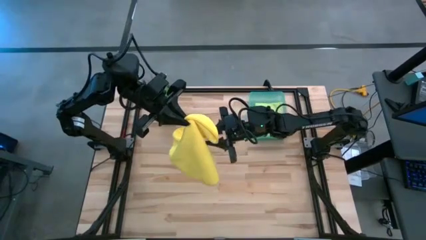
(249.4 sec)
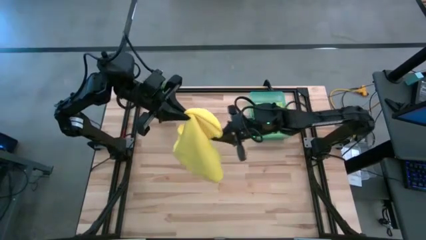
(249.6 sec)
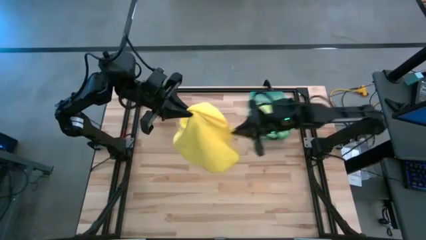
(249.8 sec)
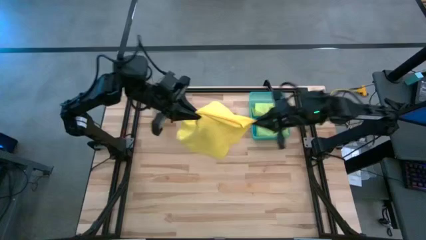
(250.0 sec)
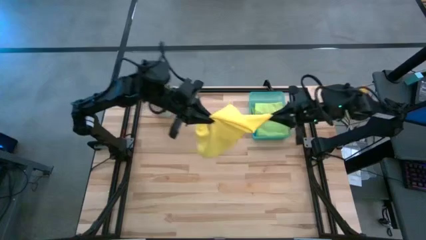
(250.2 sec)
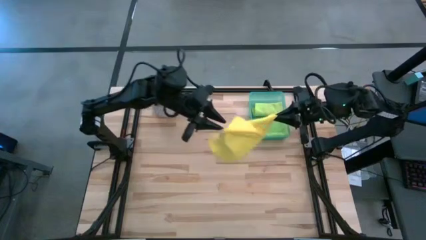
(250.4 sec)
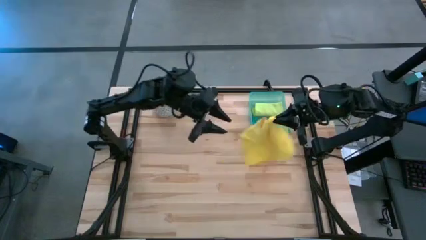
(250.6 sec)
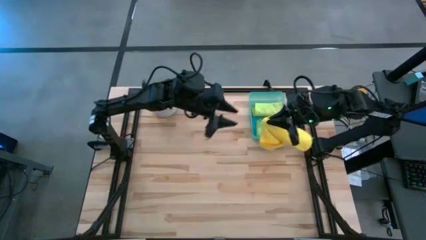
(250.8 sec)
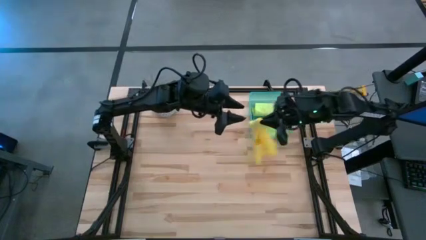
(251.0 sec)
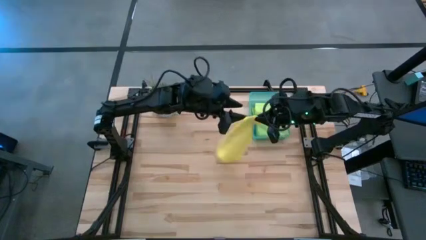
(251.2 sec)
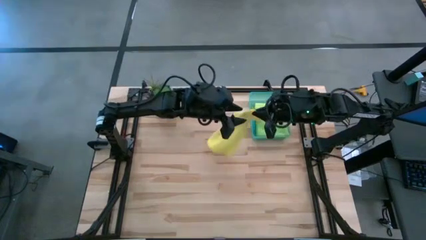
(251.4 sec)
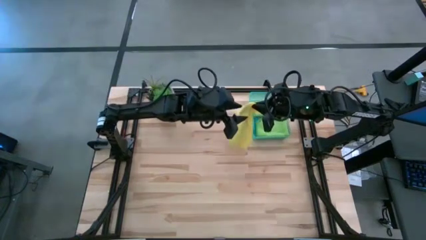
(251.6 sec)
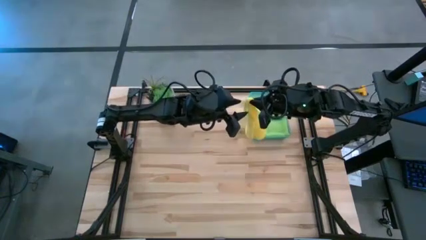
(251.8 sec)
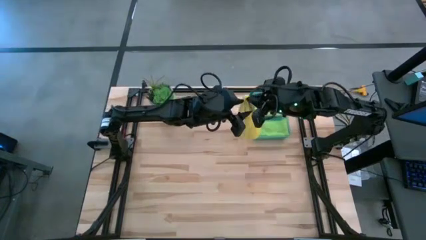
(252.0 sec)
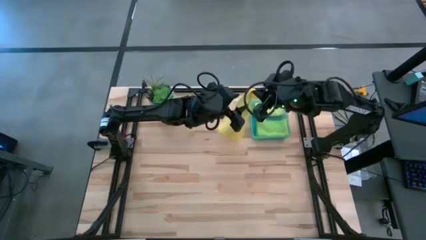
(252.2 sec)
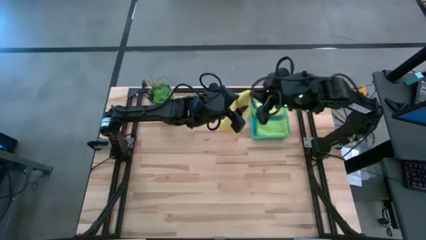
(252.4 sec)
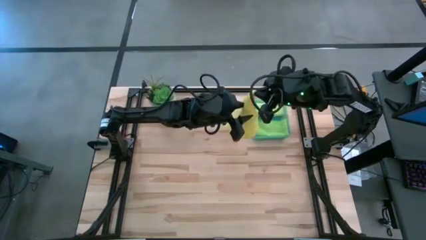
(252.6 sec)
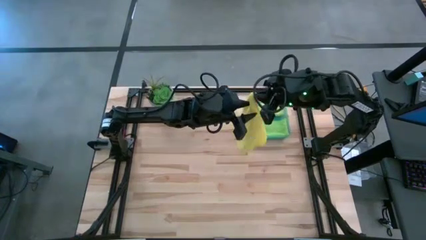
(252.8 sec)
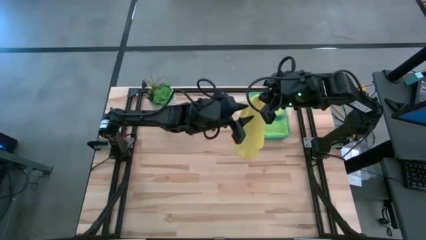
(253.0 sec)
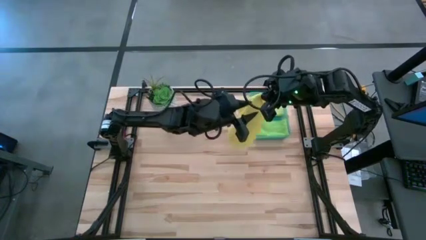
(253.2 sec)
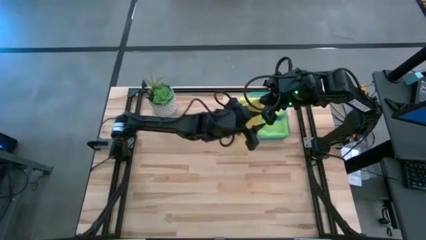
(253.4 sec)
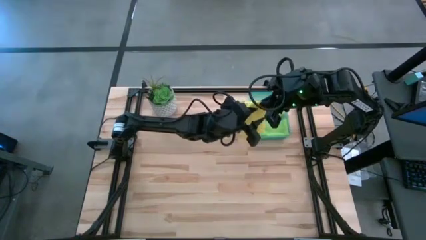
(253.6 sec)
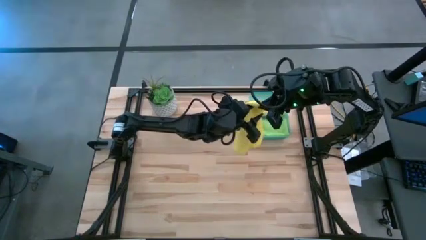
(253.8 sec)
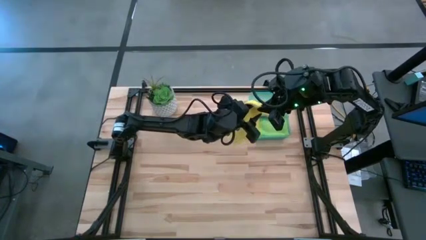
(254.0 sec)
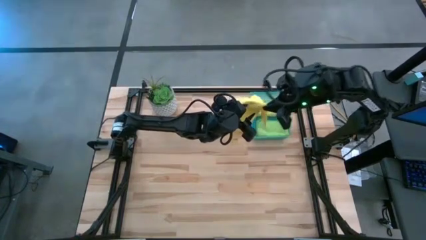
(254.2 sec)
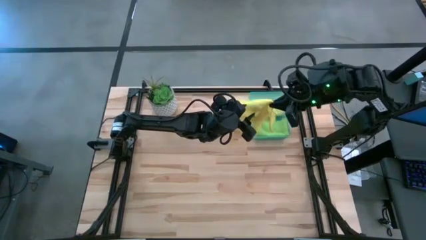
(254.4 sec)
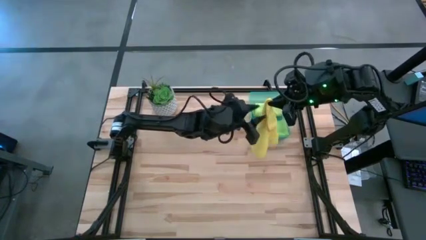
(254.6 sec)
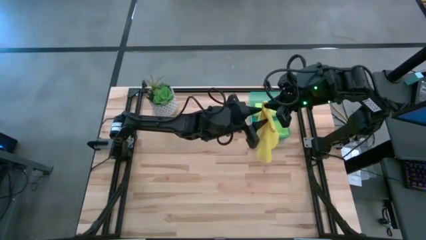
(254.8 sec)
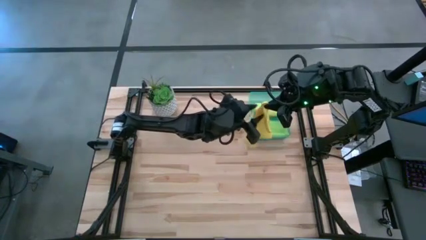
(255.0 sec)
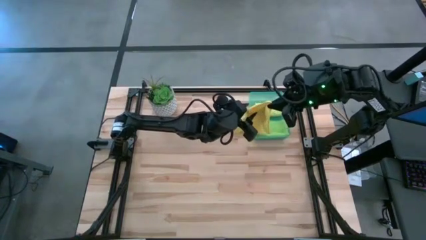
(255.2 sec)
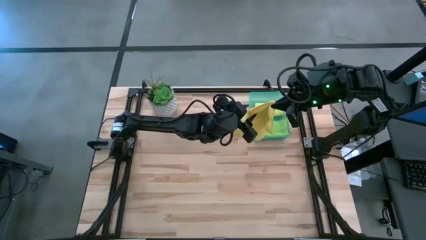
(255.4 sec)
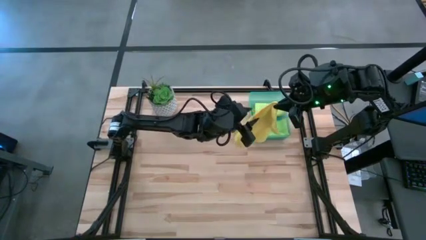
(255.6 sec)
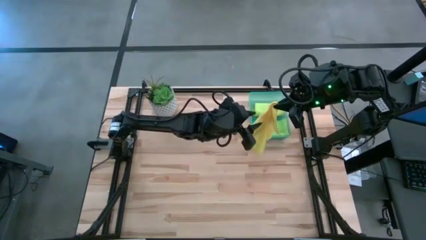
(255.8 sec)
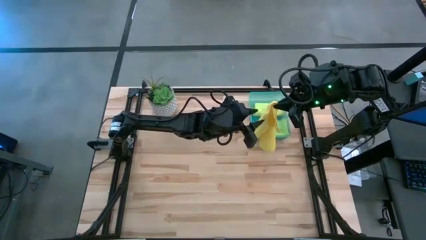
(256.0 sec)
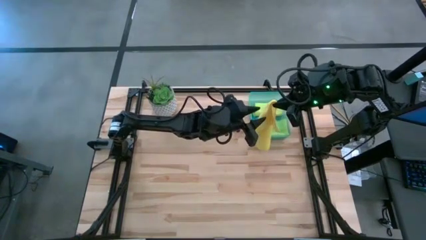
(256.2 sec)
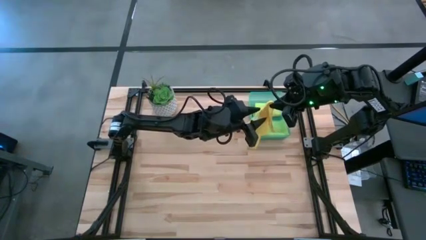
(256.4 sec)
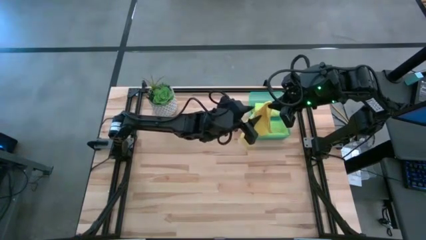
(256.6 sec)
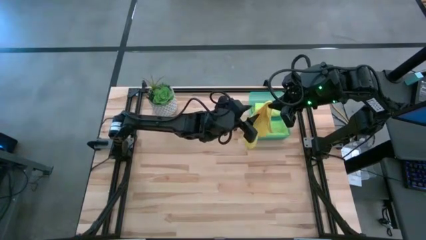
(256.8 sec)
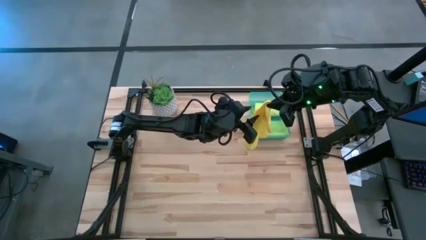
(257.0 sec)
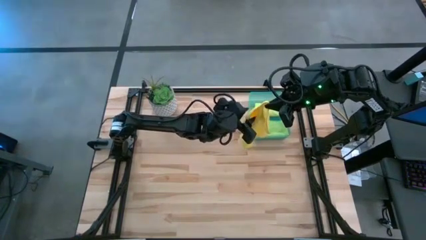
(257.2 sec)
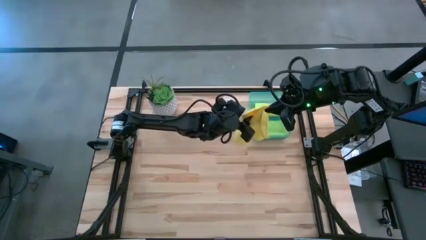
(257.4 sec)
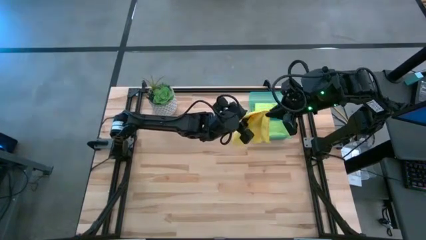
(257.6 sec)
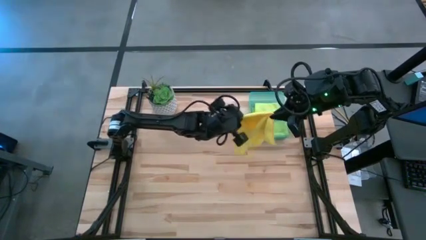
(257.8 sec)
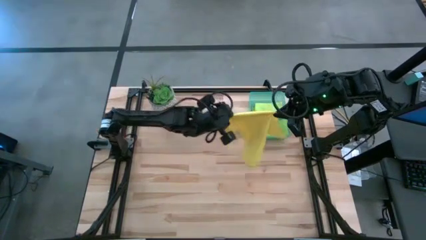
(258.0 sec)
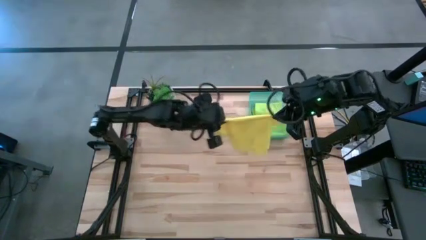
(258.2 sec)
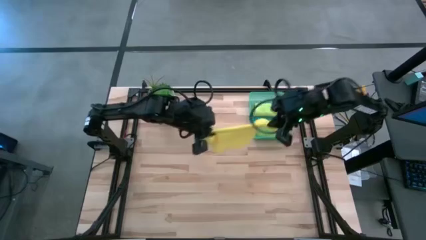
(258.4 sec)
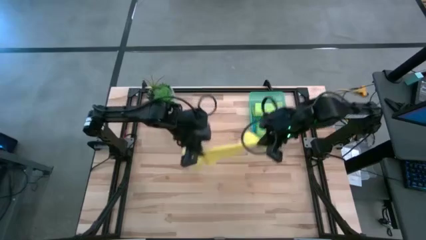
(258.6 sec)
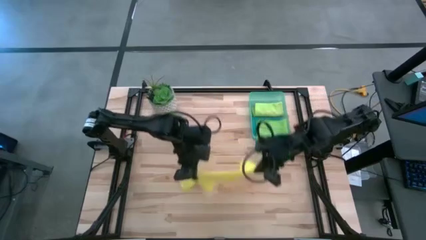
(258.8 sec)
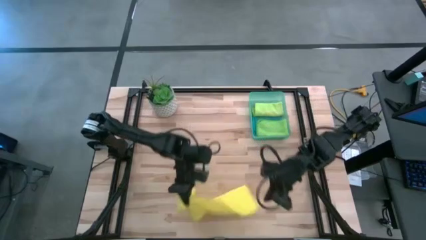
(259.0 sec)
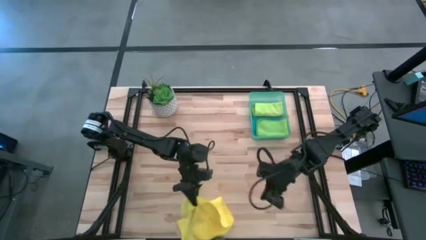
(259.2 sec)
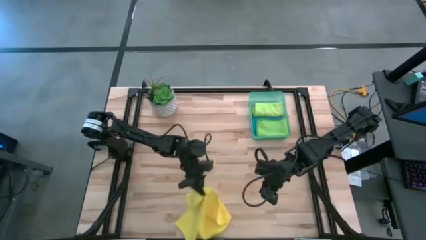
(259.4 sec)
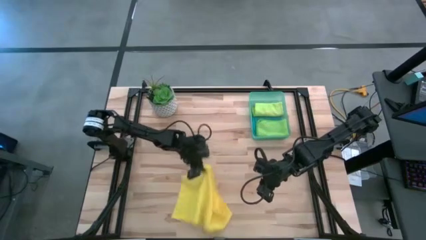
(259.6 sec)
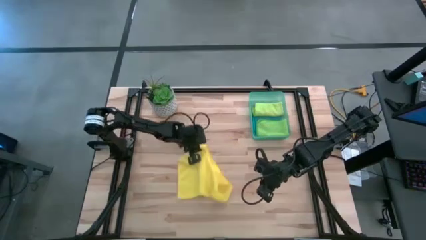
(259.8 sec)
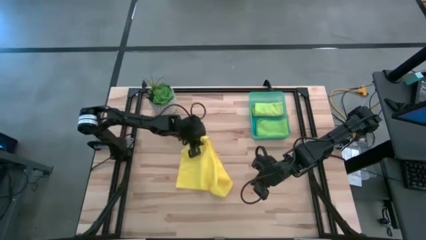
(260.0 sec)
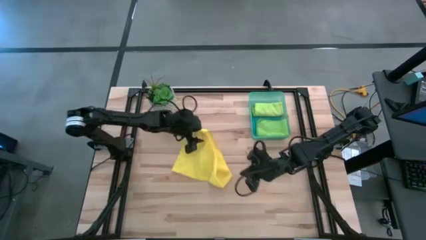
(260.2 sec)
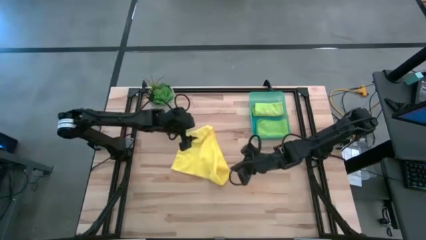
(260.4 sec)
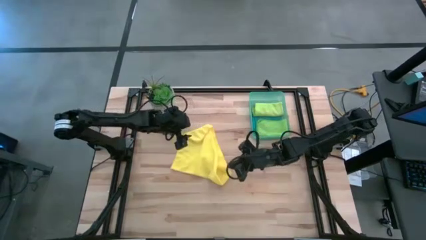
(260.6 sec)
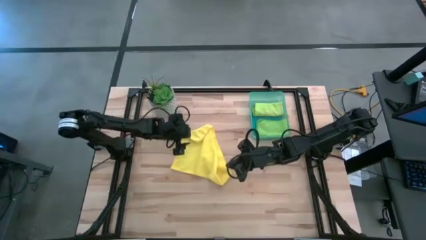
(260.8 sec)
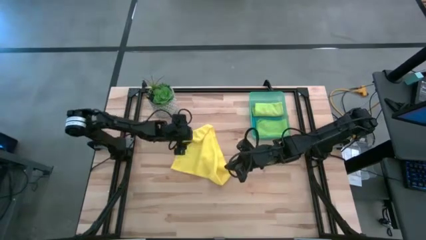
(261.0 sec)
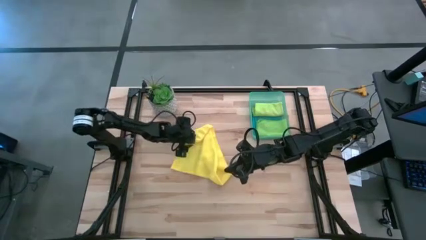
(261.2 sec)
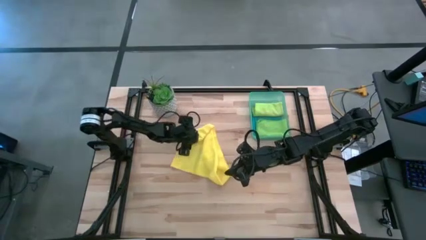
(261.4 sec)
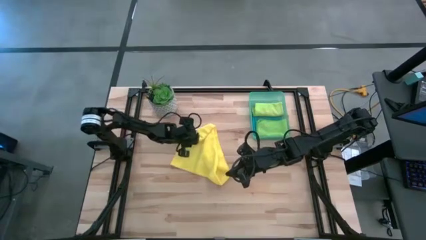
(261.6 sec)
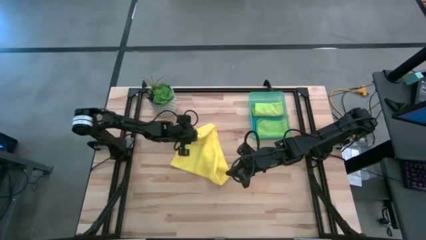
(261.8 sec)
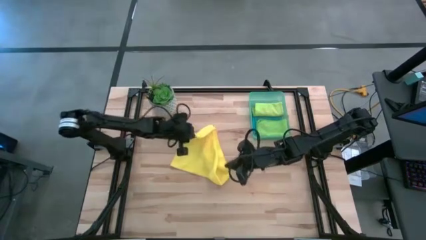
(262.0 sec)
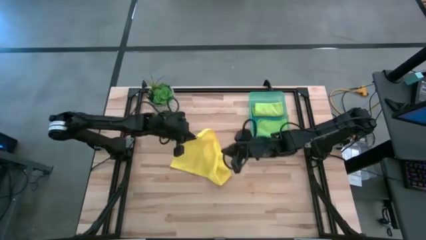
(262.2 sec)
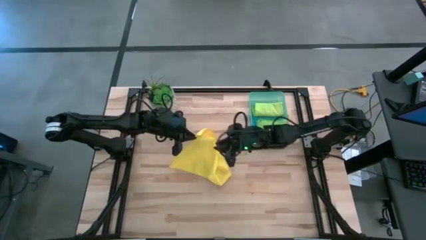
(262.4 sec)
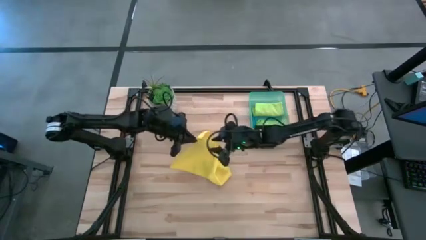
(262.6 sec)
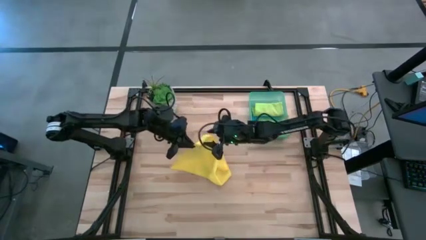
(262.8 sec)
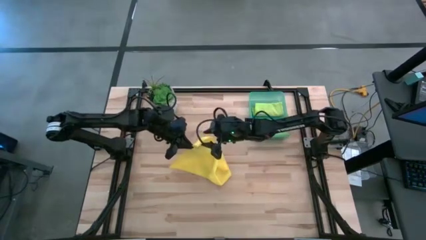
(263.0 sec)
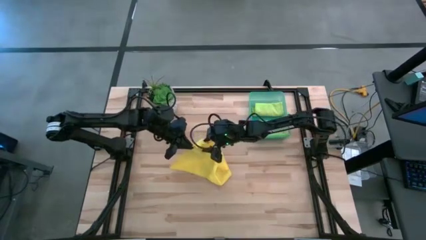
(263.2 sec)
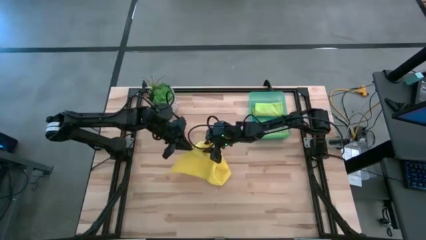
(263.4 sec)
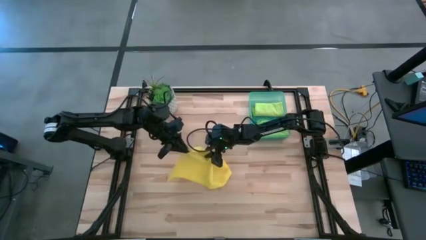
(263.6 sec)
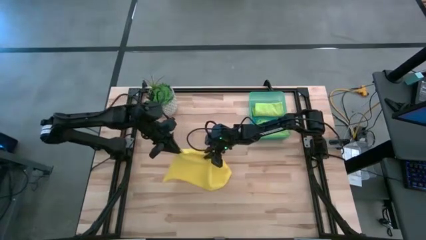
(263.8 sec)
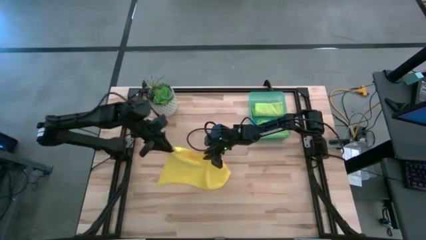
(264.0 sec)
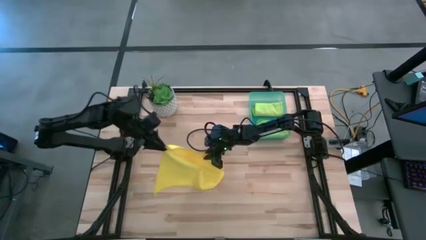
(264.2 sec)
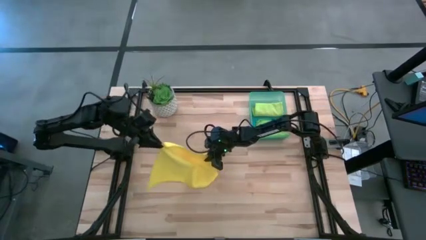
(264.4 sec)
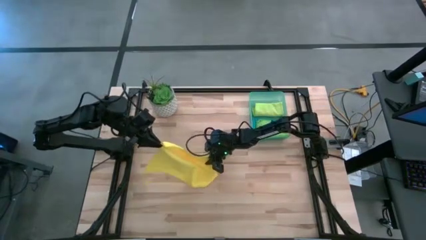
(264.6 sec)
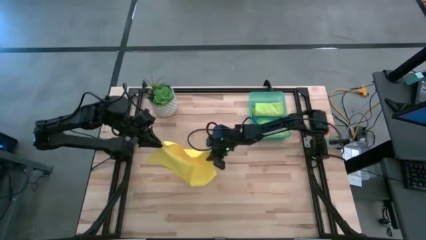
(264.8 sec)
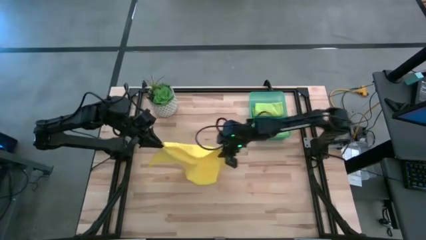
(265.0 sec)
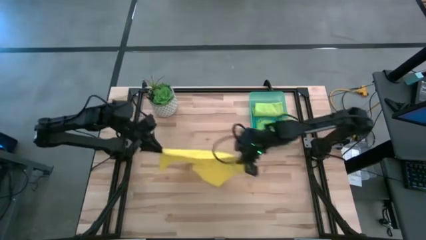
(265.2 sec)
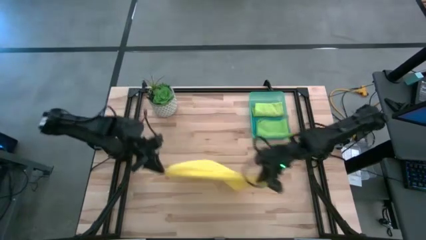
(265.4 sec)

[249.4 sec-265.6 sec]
Task: Fold microfiber towels
Fold the yellow towel
